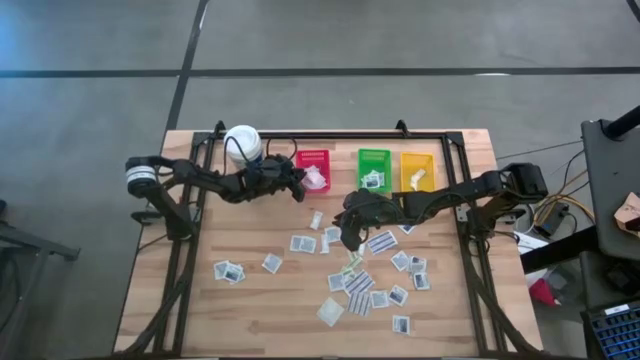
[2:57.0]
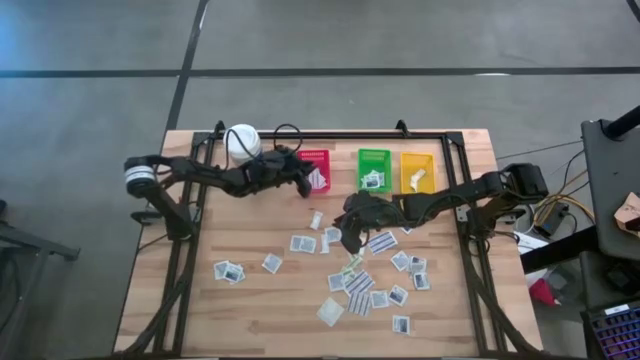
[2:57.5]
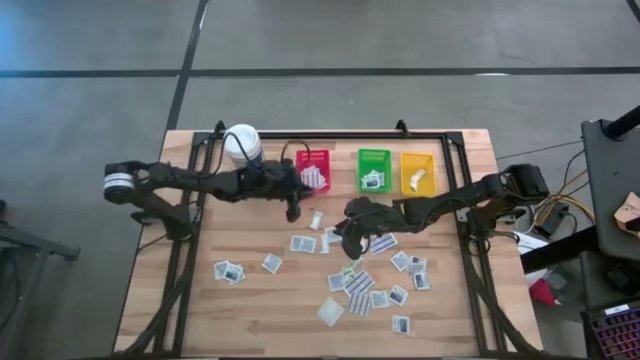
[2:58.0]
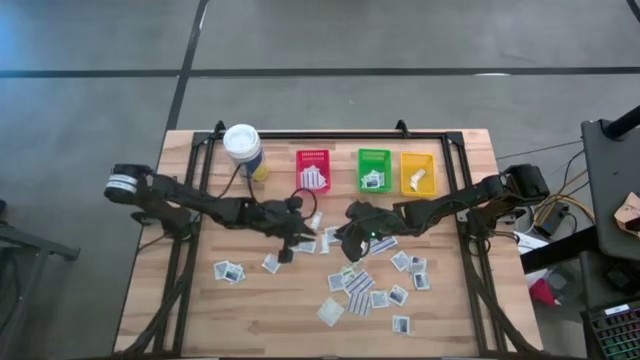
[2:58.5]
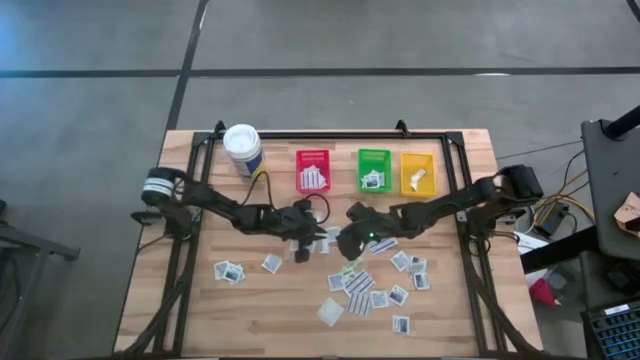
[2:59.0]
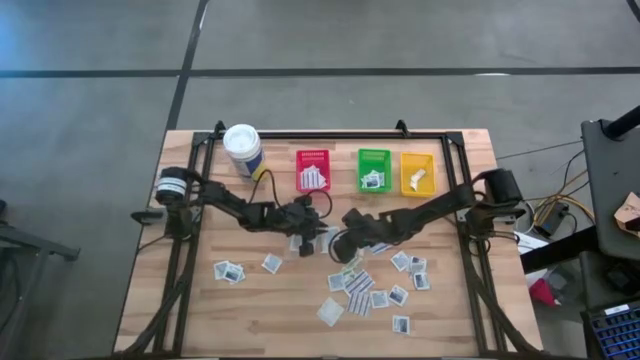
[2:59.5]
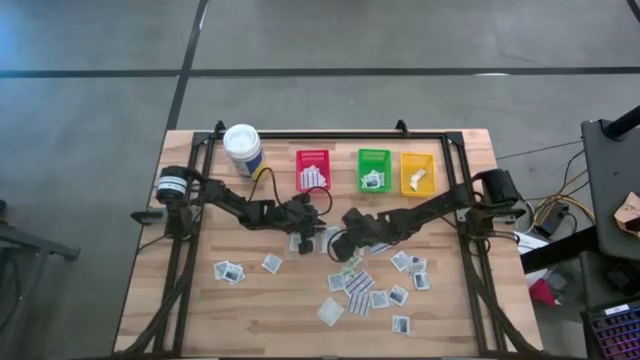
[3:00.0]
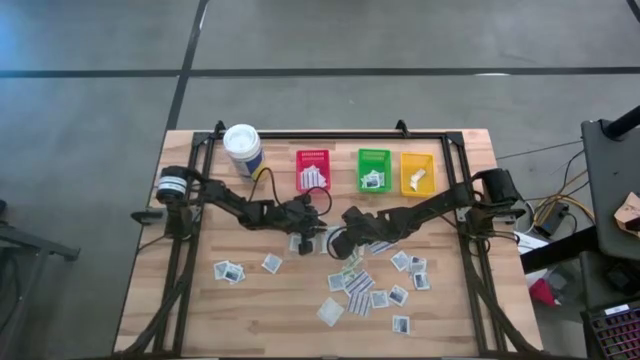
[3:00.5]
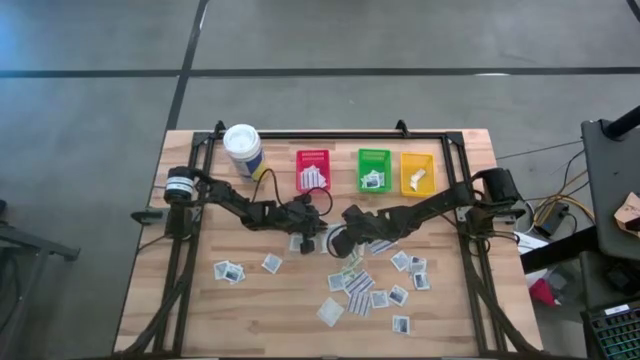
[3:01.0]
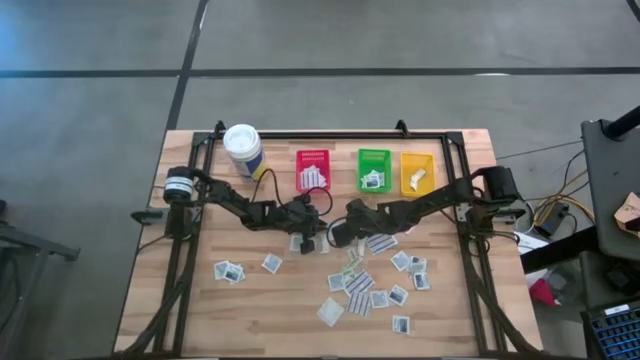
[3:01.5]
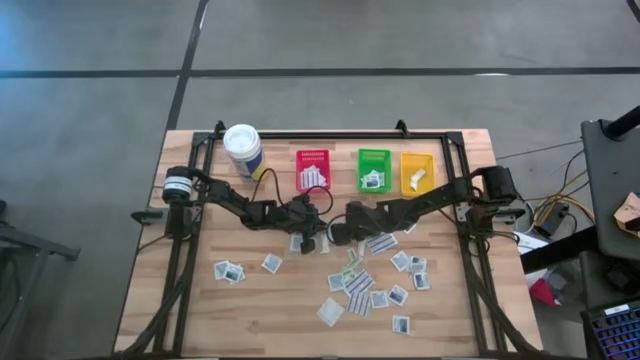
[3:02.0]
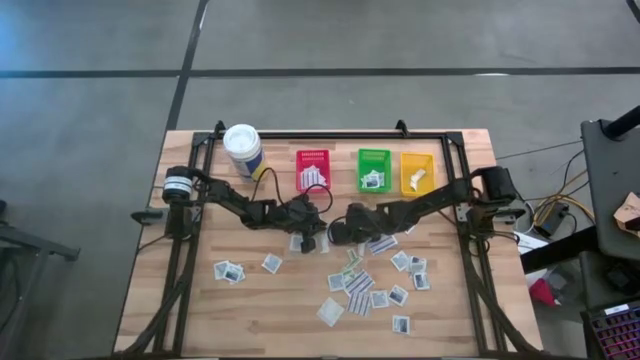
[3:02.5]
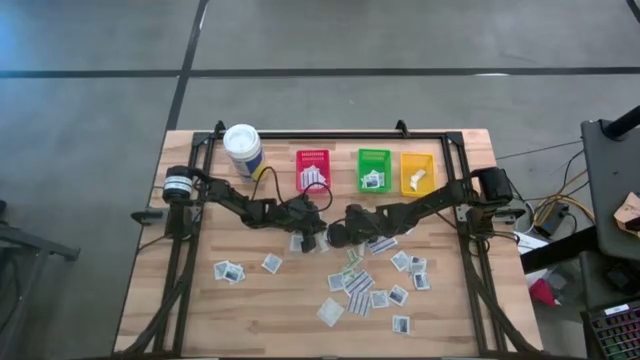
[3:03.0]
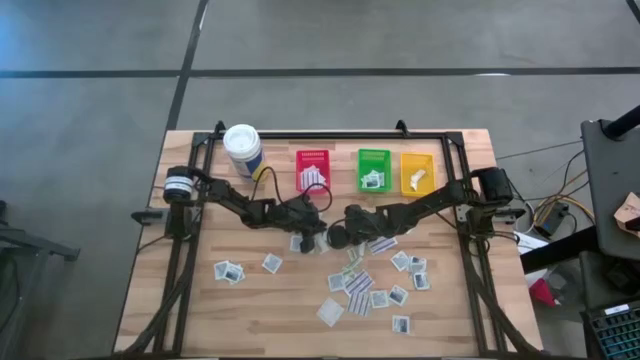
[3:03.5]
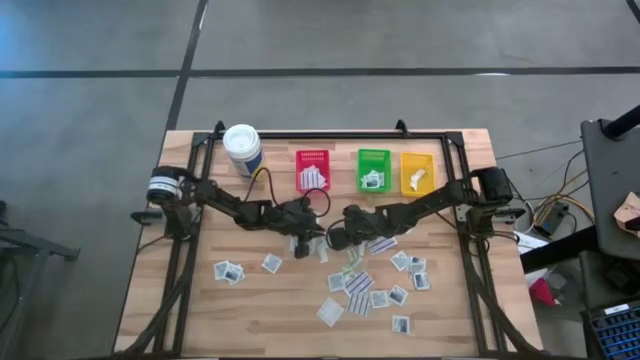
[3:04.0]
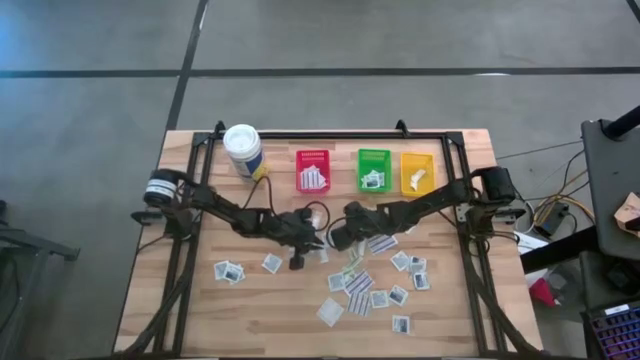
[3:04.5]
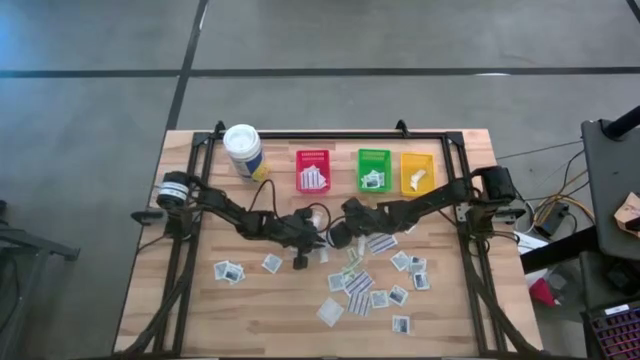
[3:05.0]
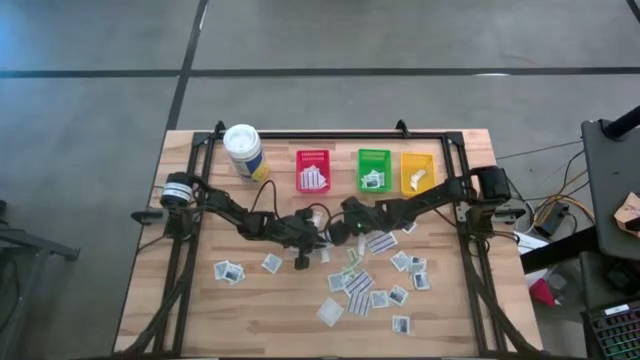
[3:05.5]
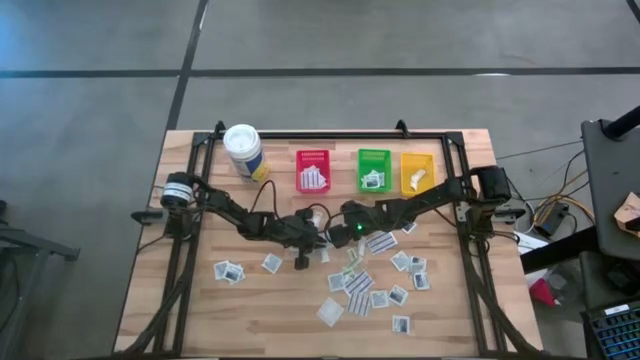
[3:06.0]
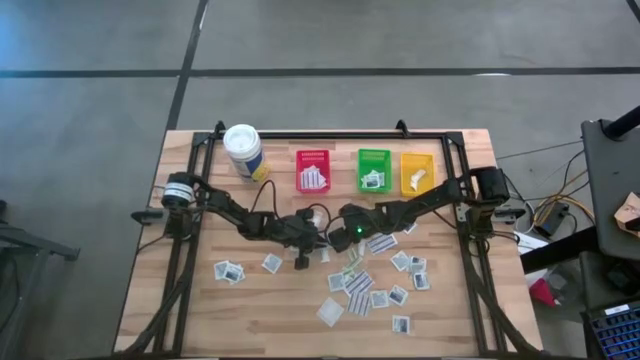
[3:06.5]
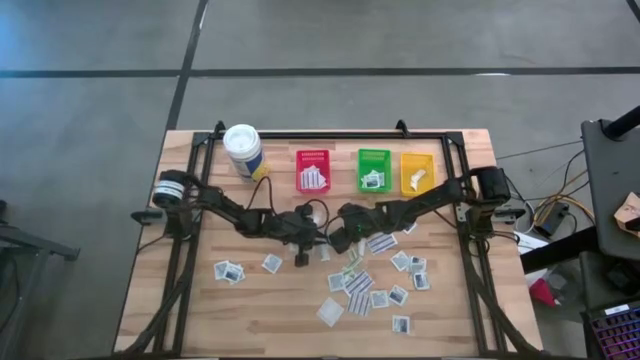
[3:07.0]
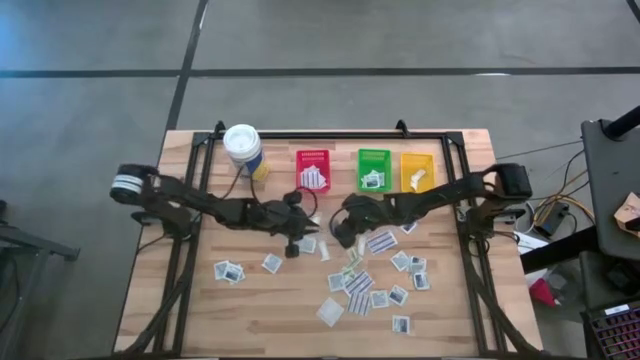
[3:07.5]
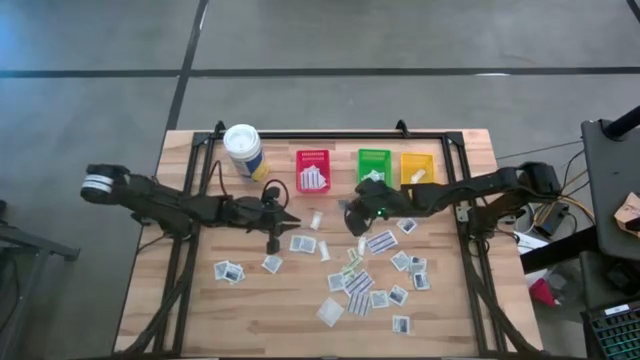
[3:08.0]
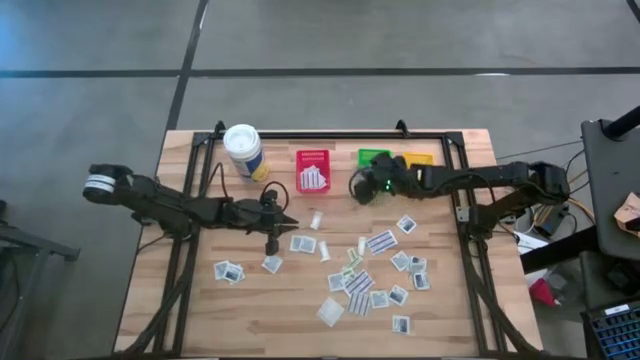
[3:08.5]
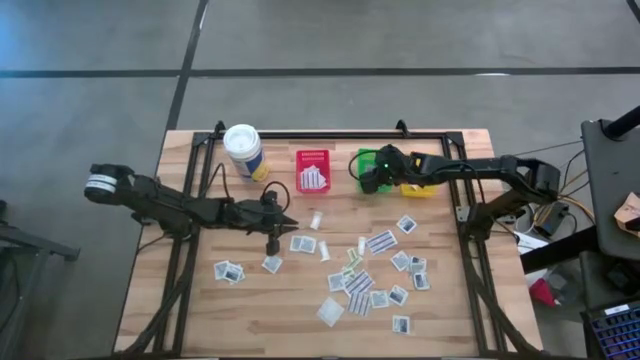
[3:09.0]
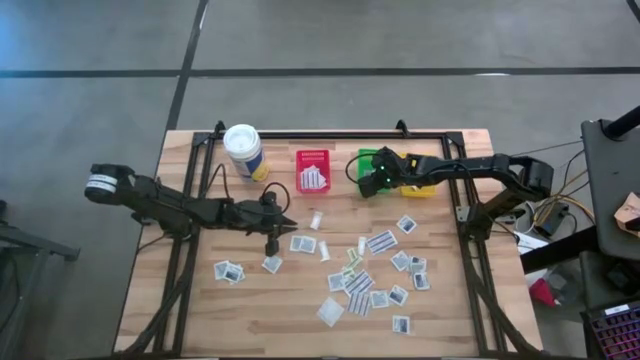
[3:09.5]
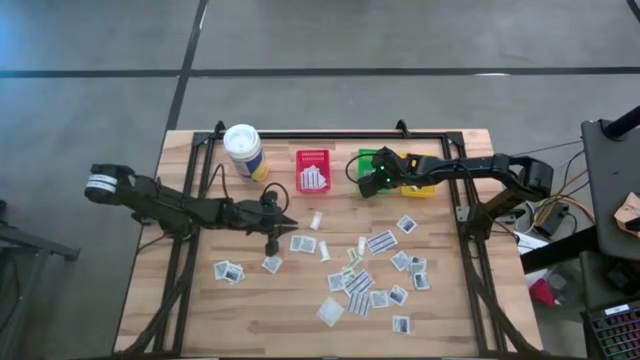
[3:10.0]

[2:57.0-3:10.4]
Task: Pick & Place First Aid Supplies
Put the alcohol pad in the green bin

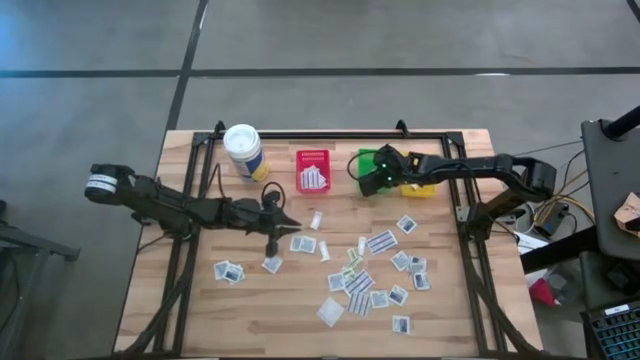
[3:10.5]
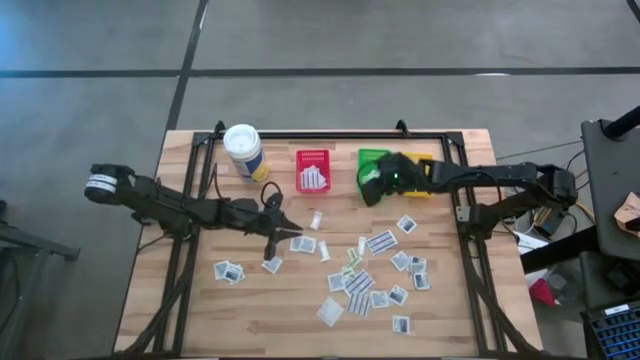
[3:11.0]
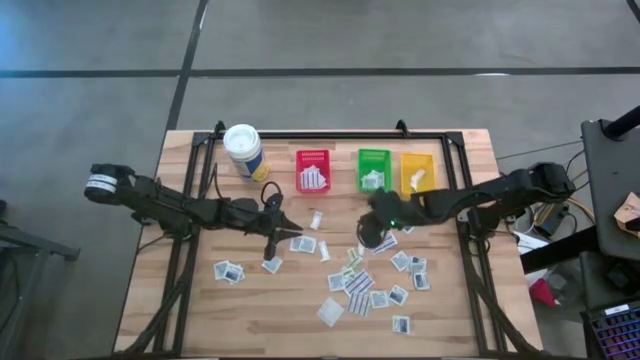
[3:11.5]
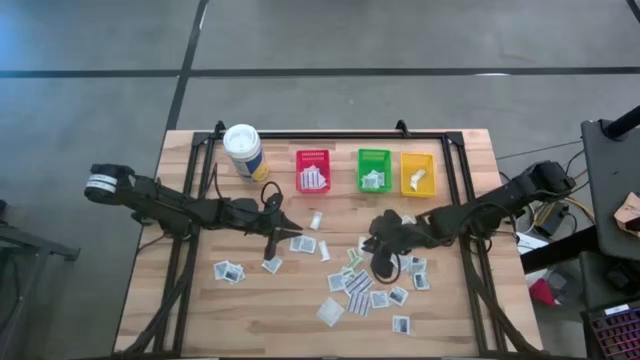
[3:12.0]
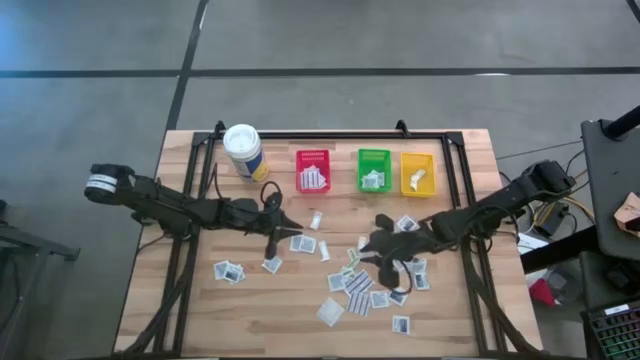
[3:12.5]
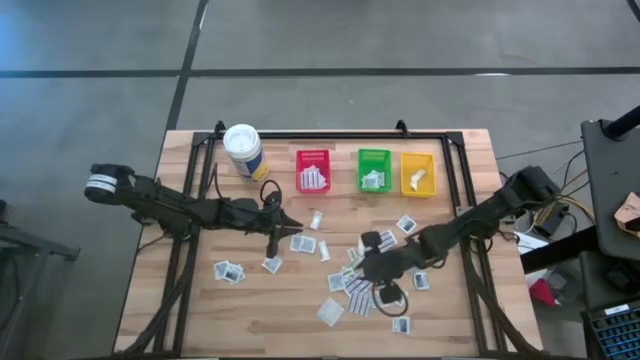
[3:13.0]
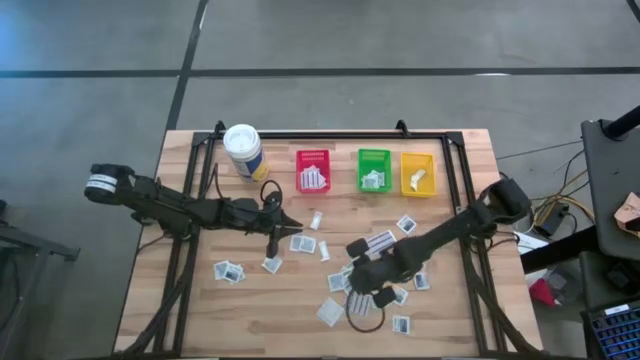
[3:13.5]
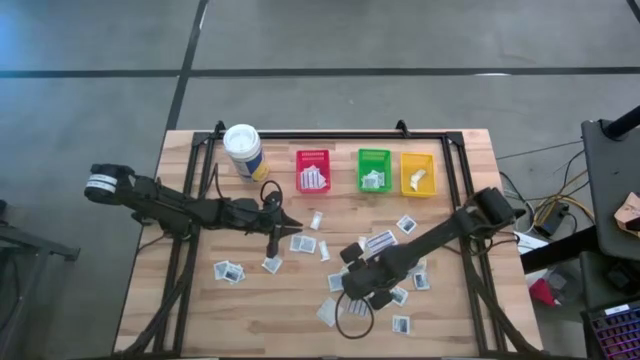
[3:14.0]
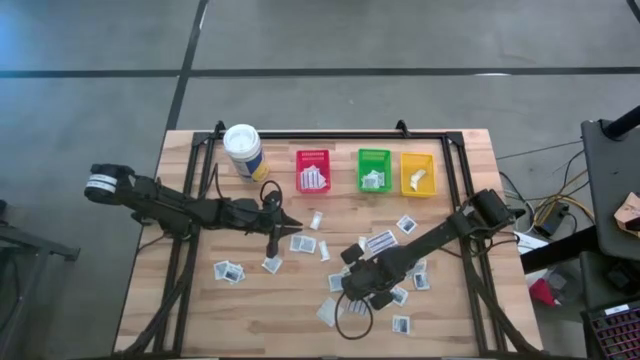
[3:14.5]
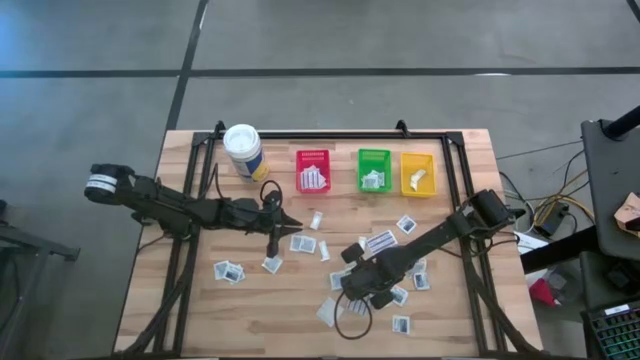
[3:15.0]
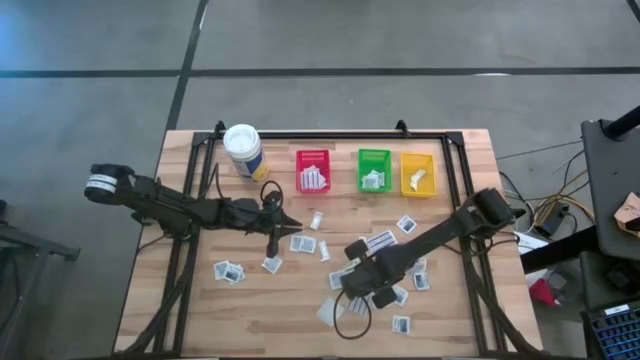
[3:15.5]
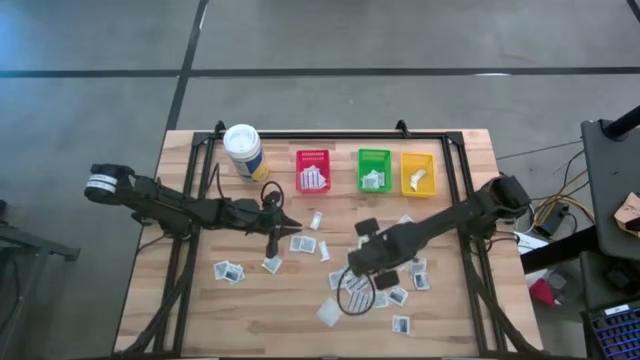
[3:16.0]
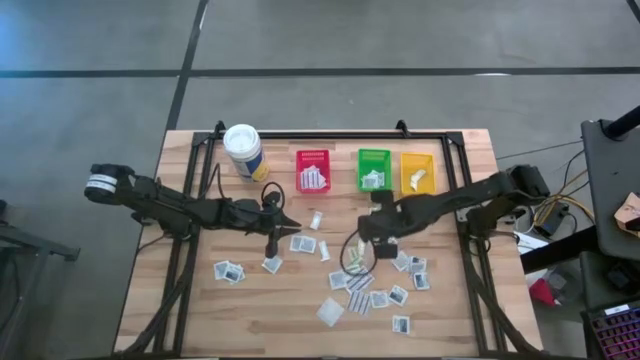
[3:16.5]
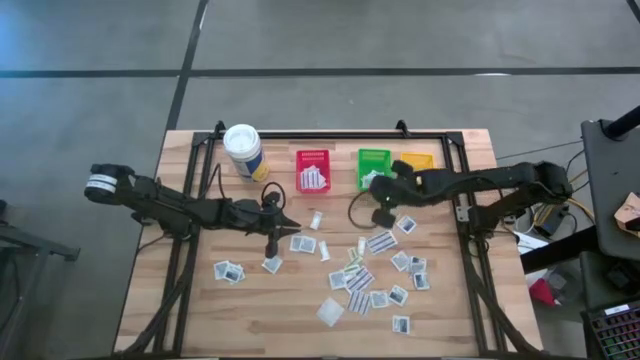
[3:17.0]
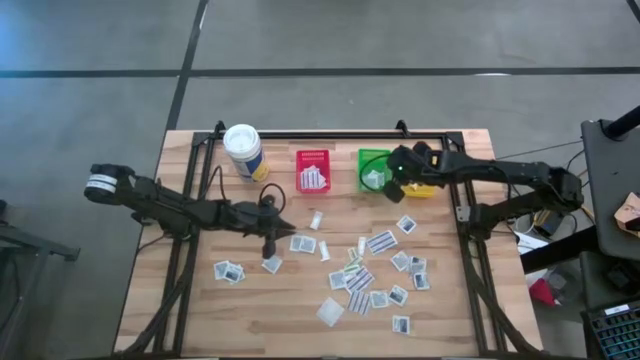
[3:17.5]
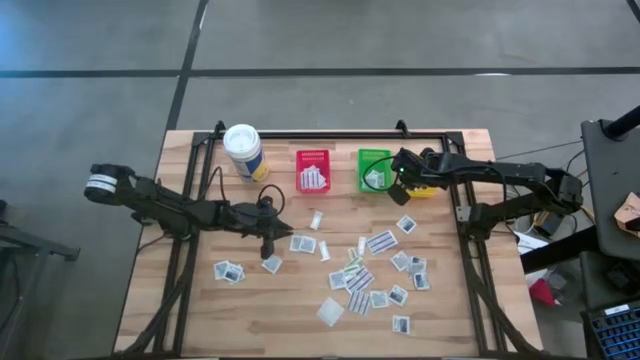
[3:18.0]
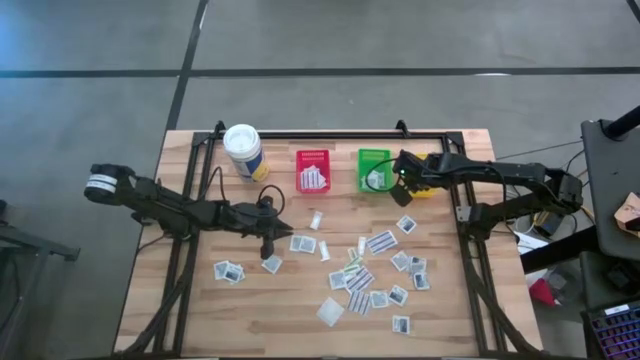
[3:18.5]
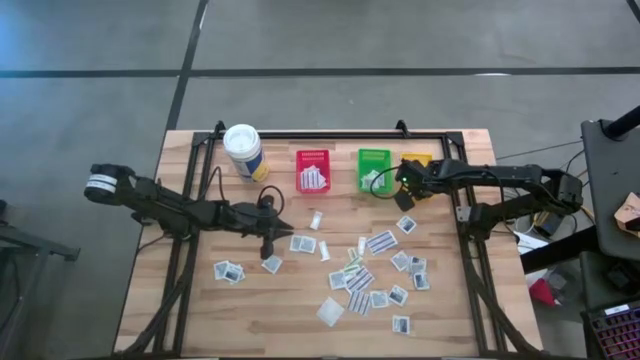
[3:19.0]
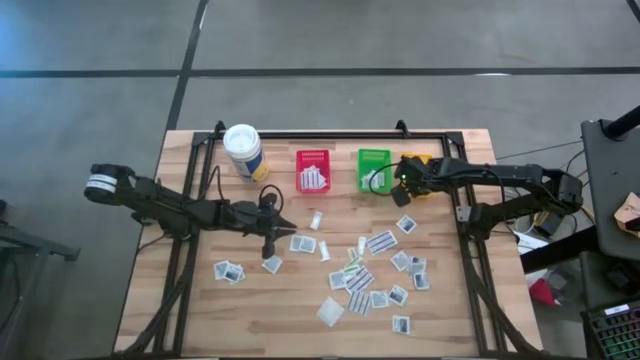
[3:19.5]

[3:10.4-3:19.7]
Put the green bandage in the yellow bin
